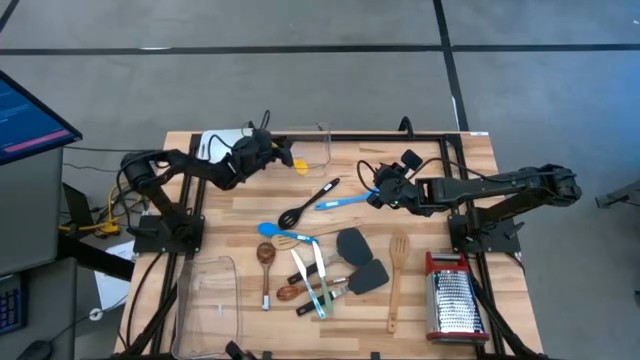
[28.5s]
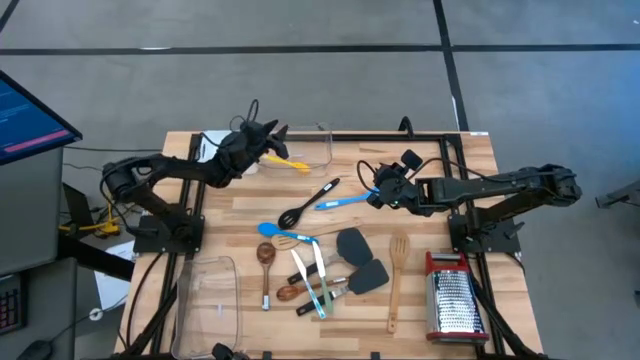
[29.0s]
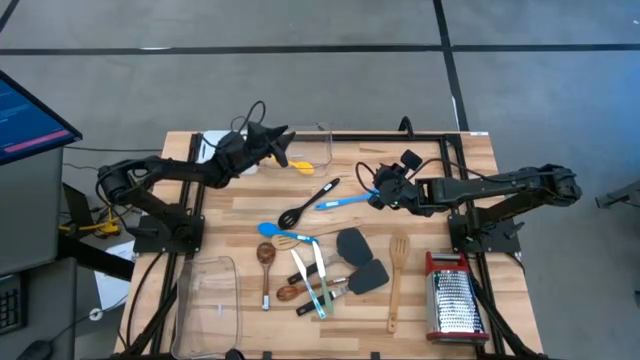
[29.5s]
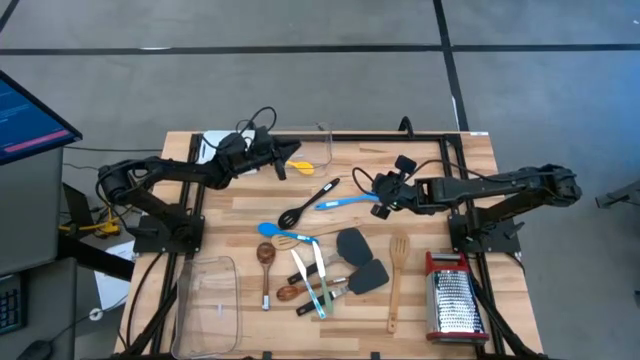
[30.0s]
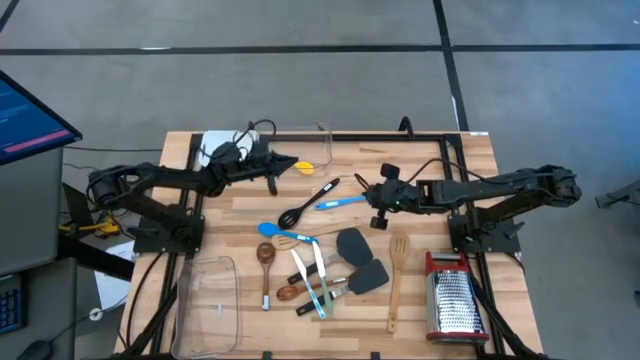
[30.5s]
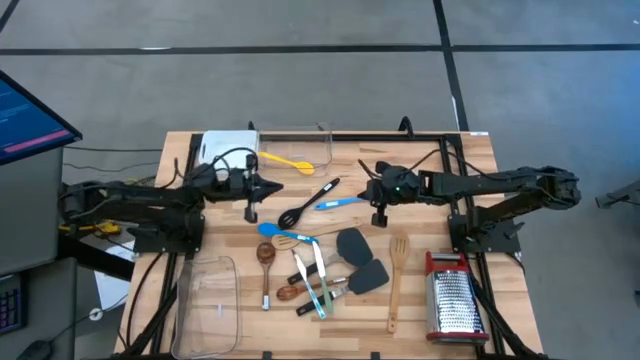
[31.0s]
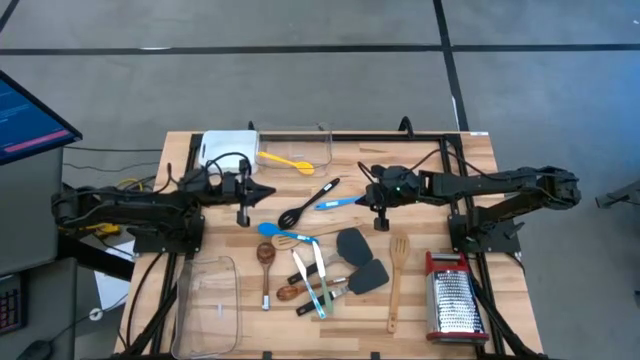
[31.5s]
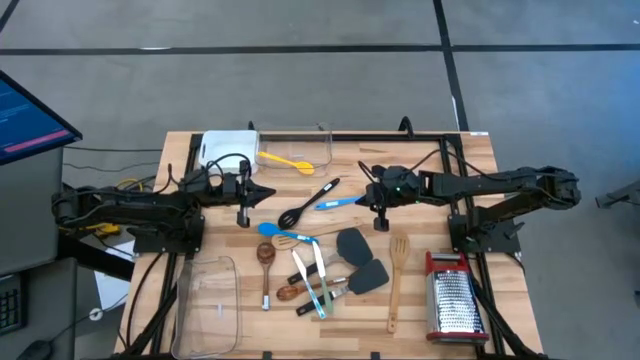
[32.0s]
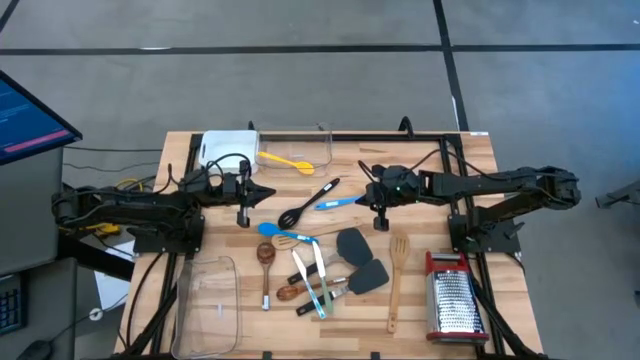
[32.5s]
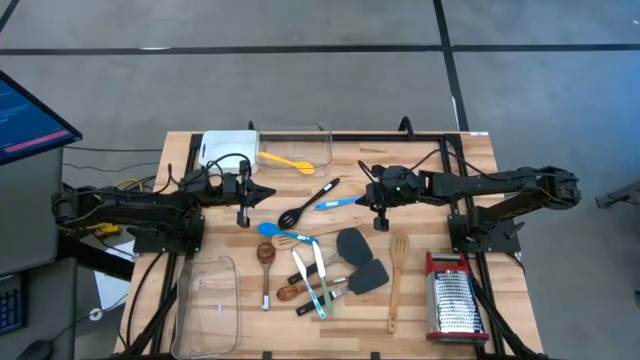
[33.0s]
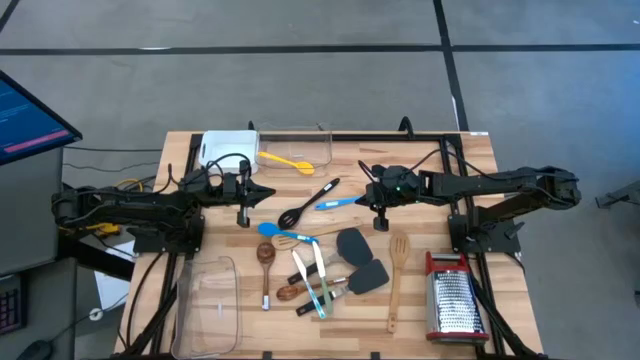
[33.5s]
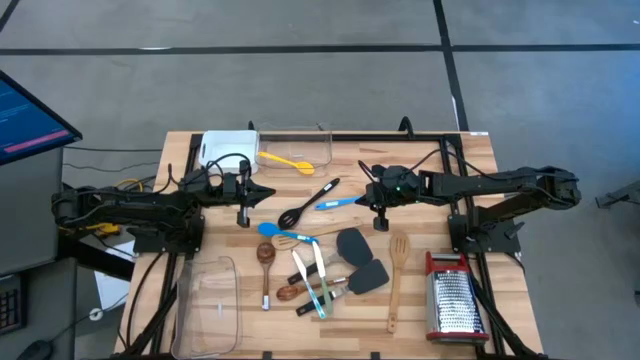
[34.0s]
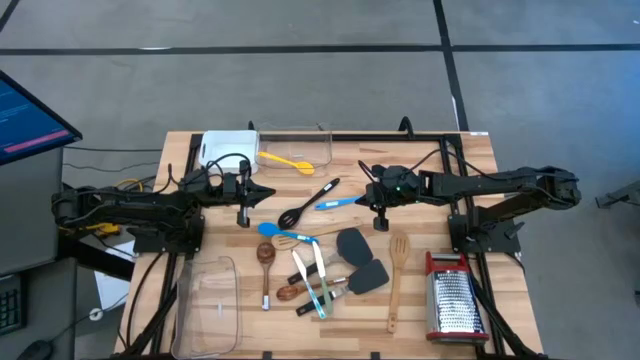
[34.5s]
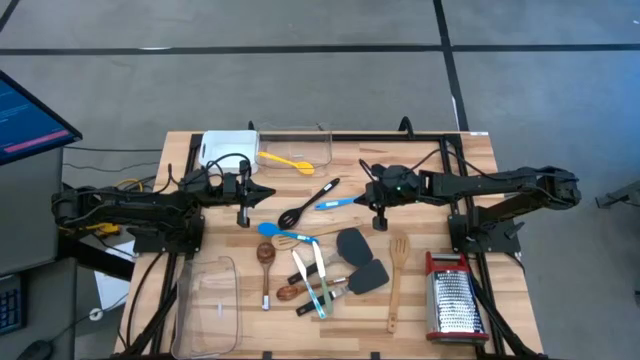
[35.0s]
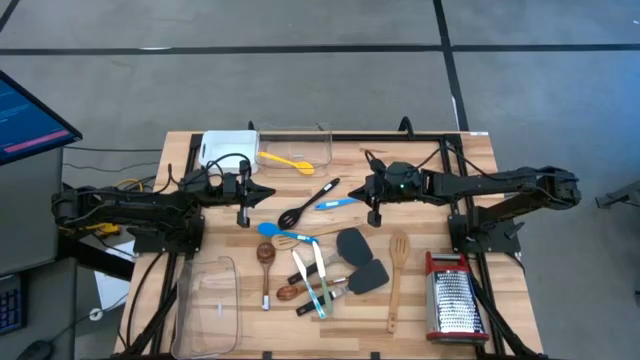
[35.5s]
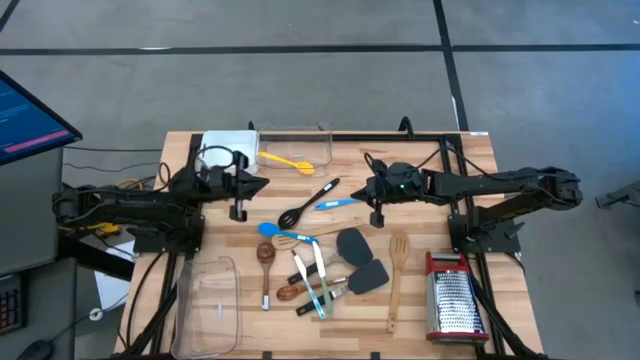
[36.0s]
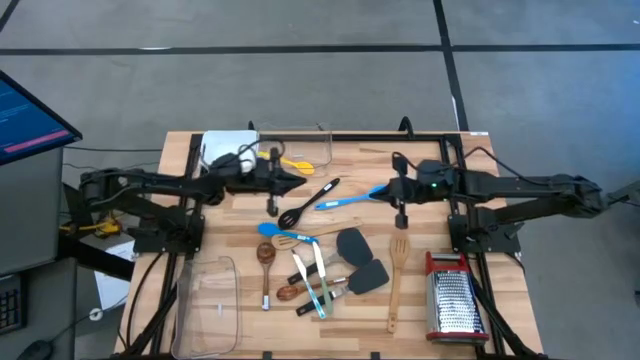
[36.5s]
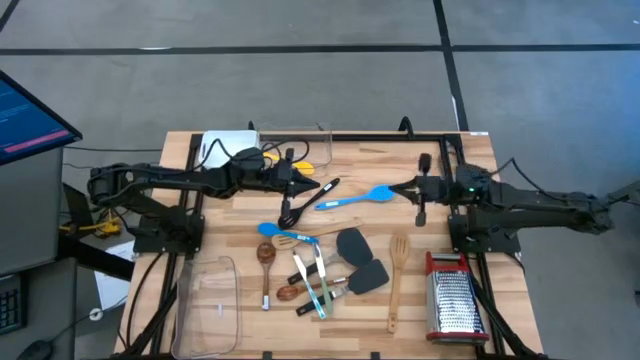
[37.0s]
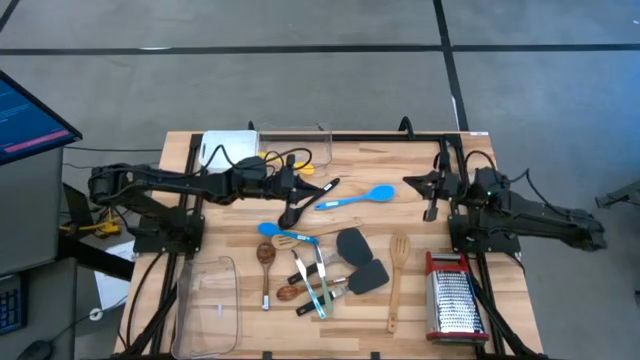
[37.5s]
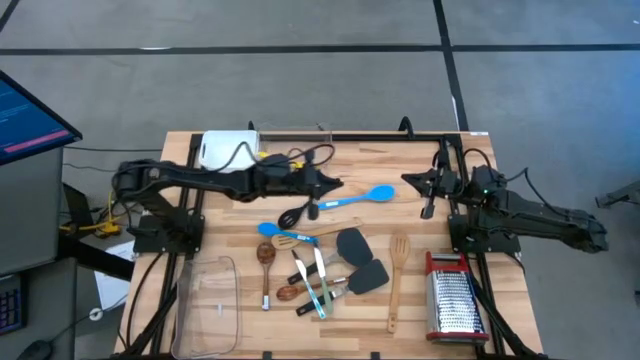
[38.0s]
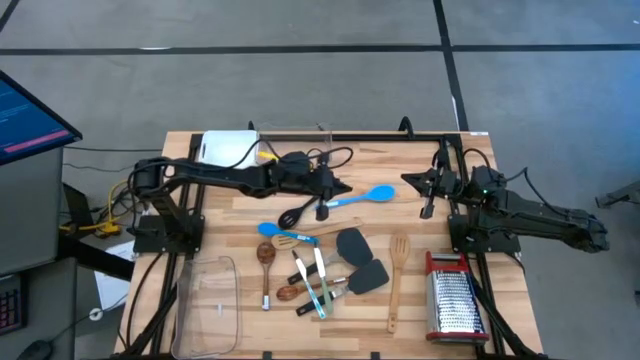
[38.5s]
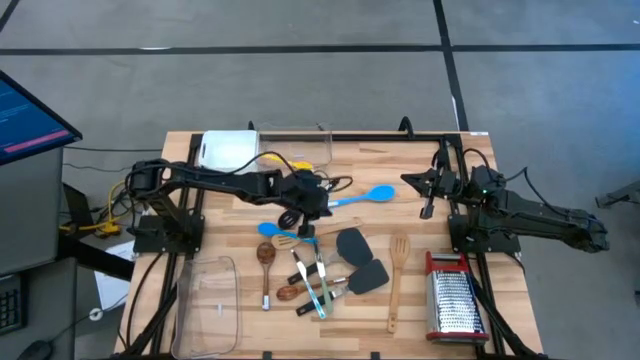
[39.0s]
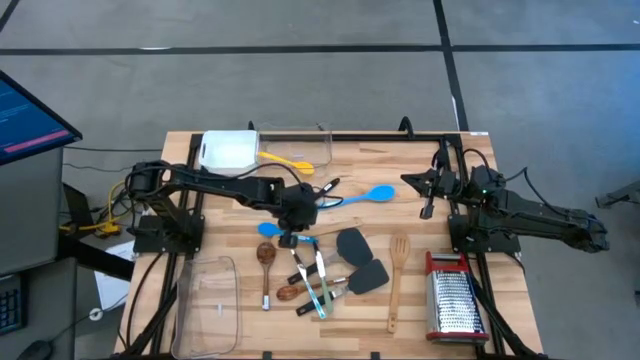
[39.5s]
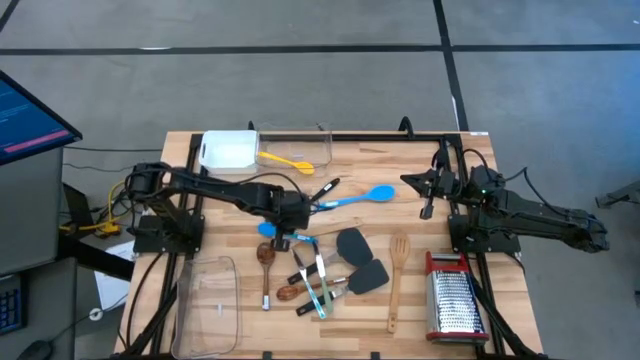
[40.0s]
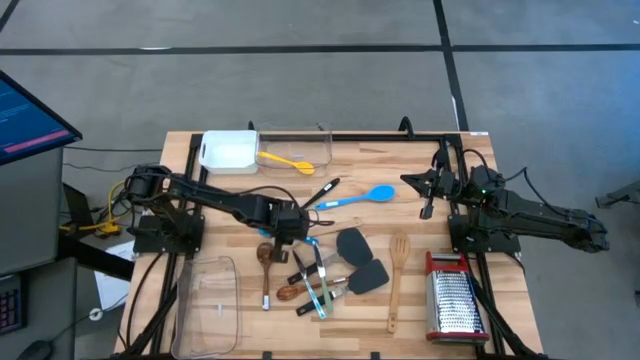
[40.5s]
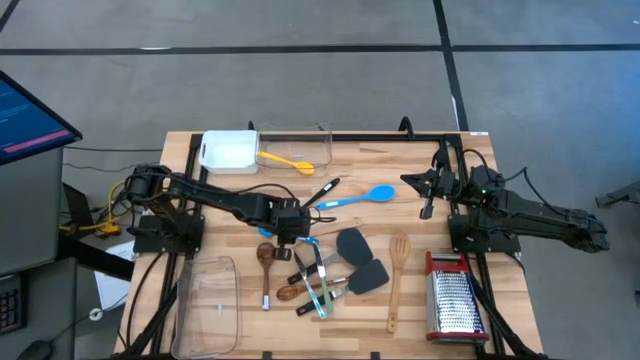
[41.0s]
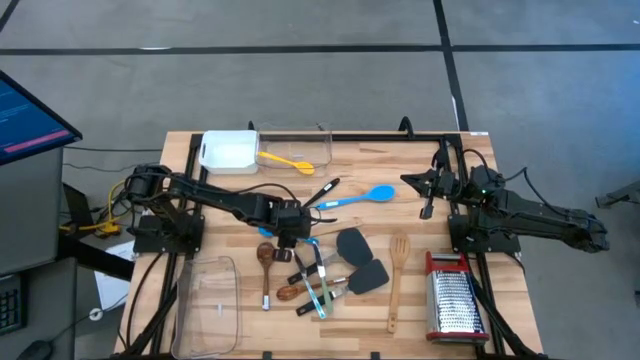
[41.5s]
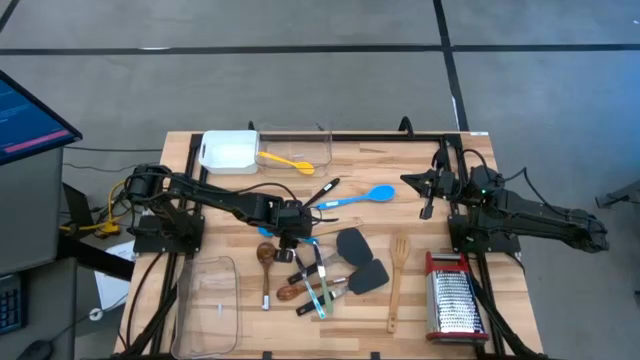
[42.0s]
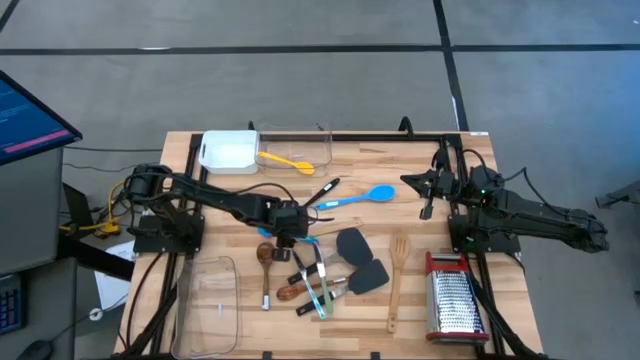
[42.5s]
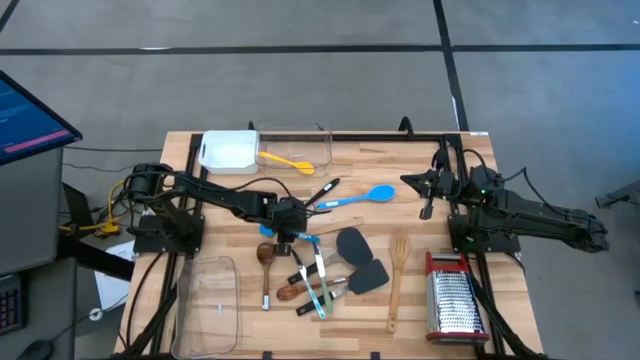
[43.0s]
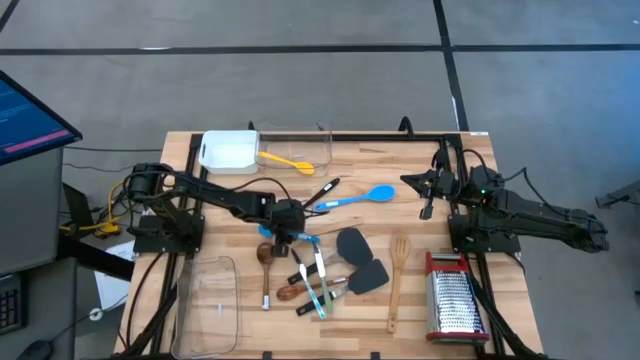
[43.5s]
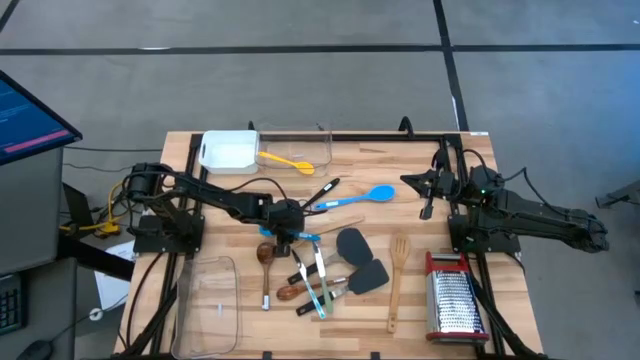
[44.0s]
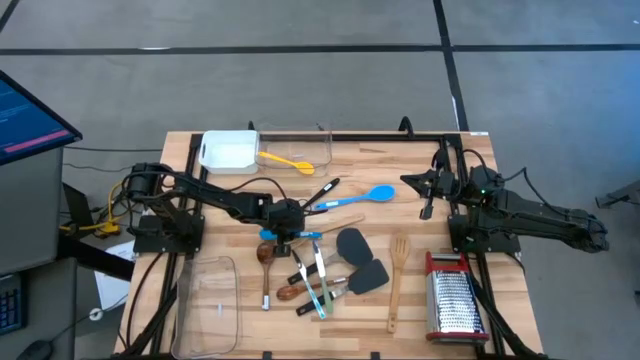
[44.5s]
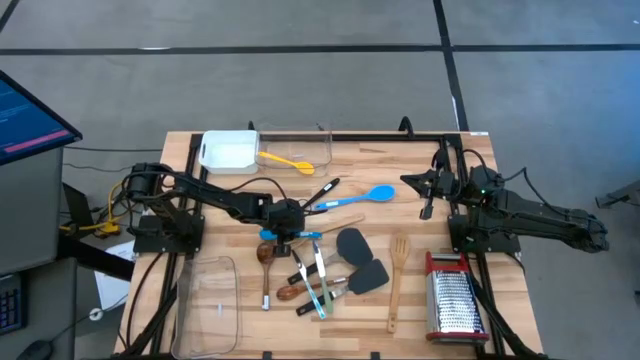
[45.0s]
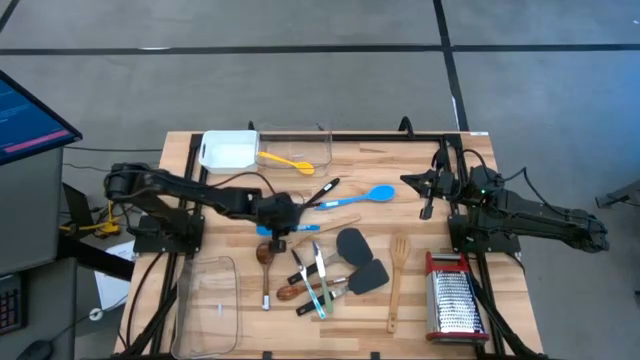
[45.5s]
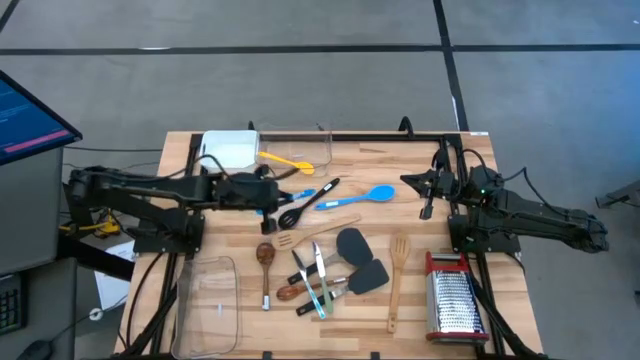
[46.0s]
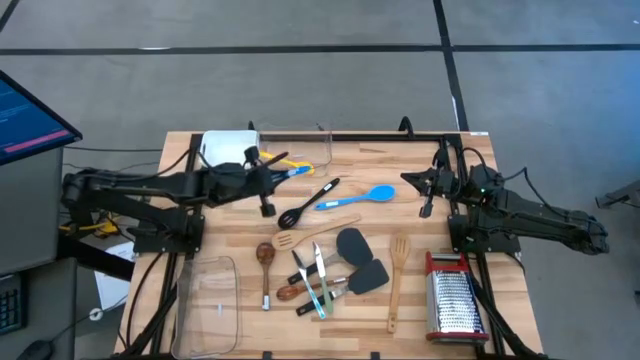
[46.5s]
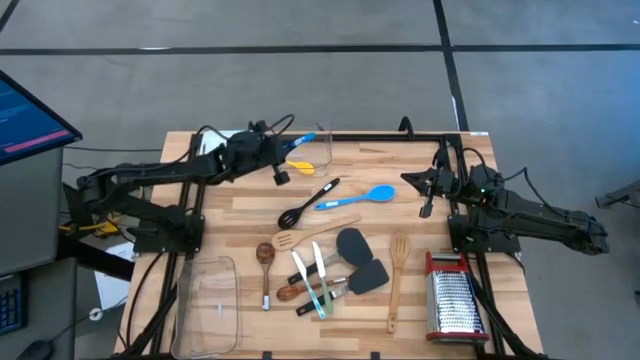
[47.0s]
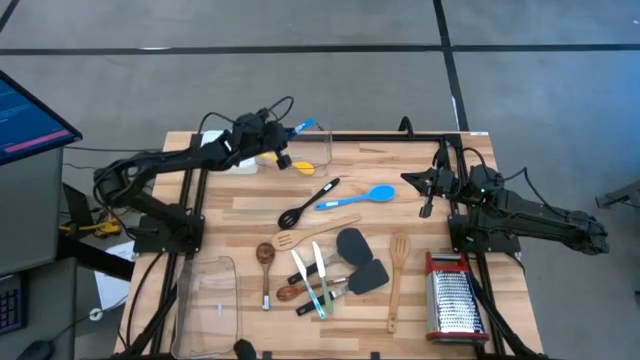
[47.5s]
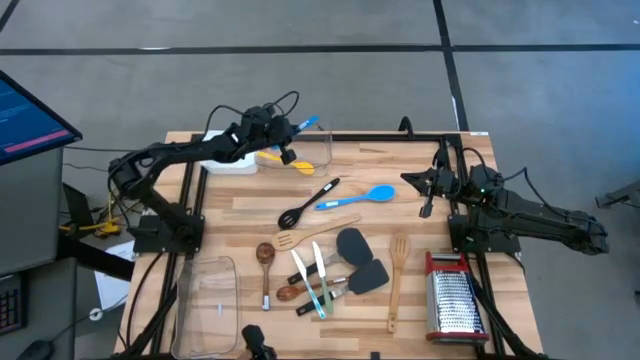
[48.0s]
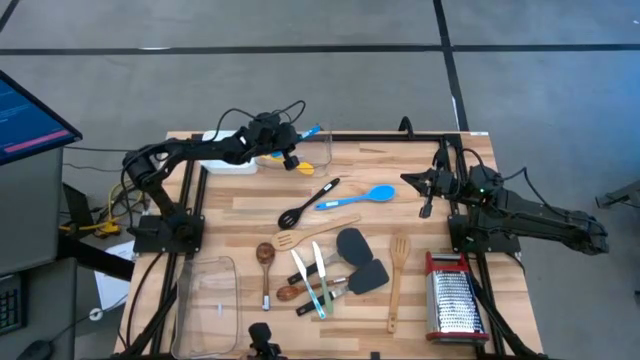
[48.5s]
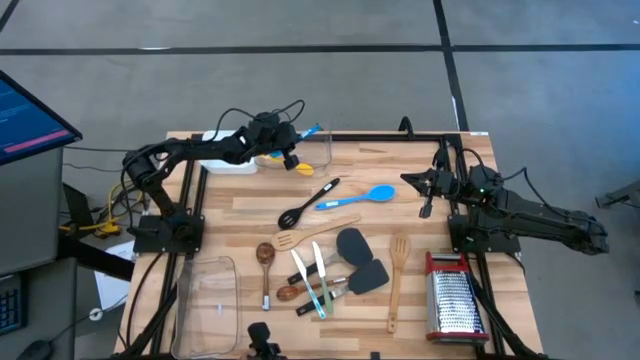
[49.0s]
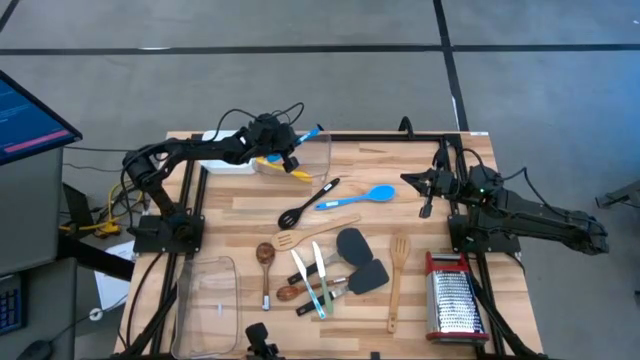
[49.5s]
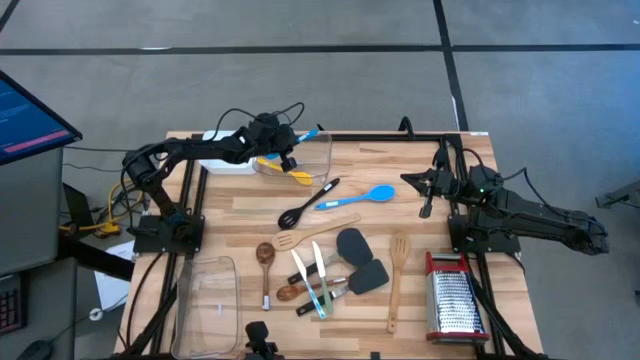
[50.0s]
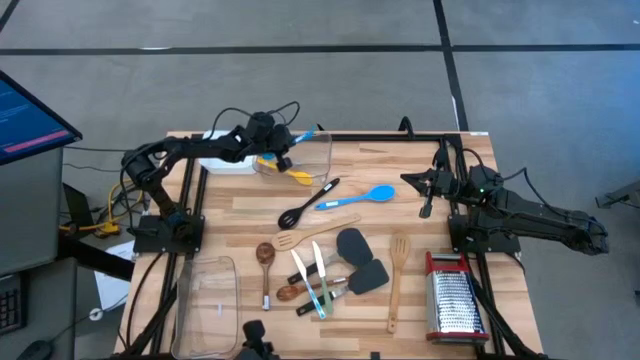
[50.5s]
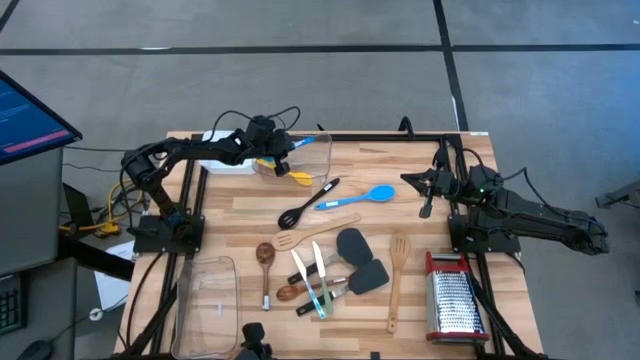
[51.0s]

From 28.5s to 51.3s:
Task: Pick & Place Kitchen Items
Put the blue serving spoon into the top transparent bin
